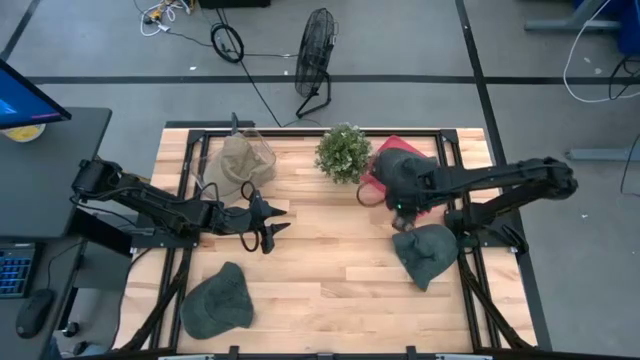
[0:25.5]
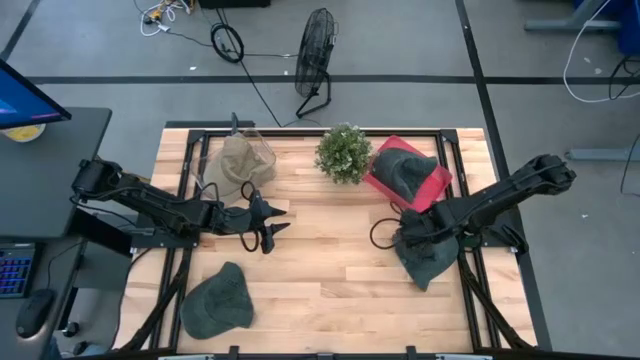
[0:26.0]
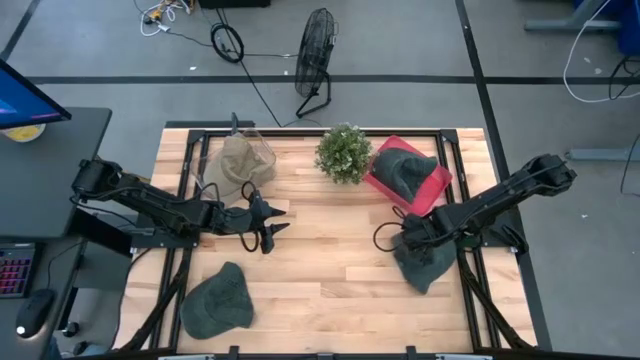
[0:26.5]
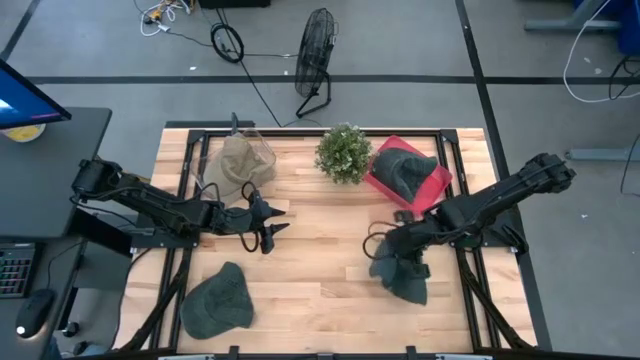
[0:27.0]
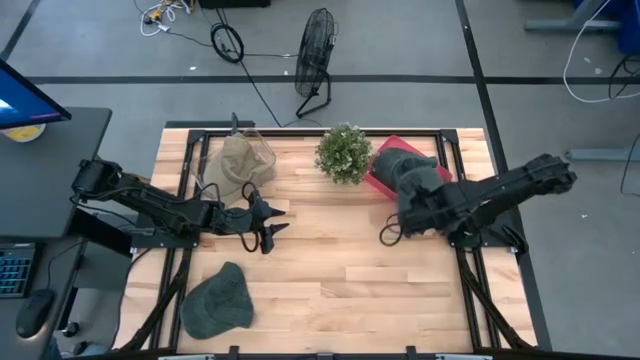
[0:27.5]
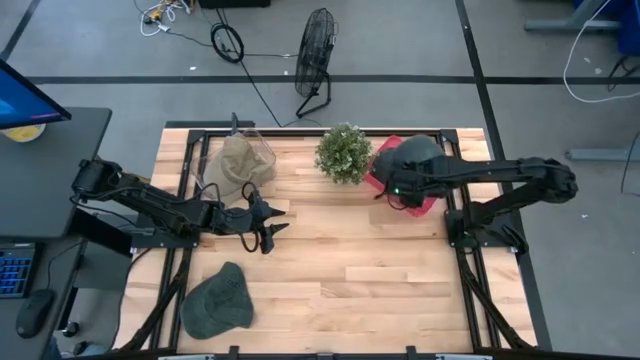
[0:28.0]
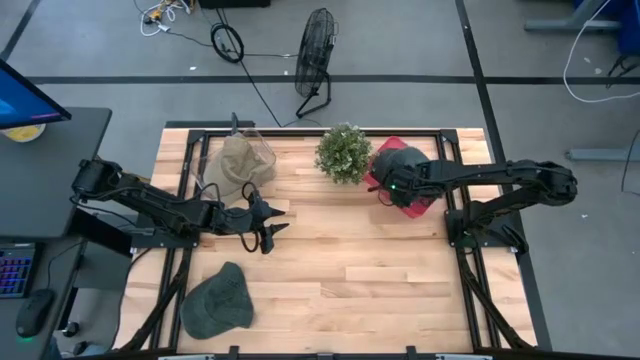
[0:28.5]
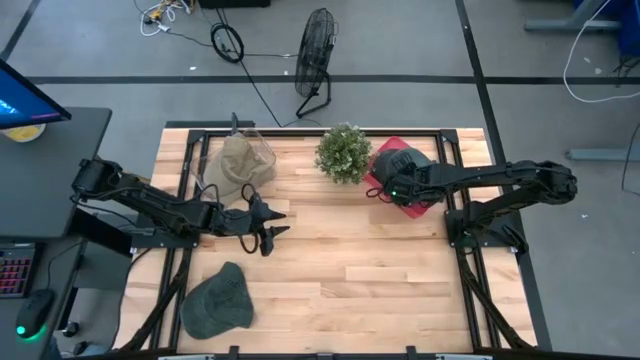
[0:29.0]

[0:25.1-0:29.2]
Task: Pick & Place hat
Put the right black cap into the red bin

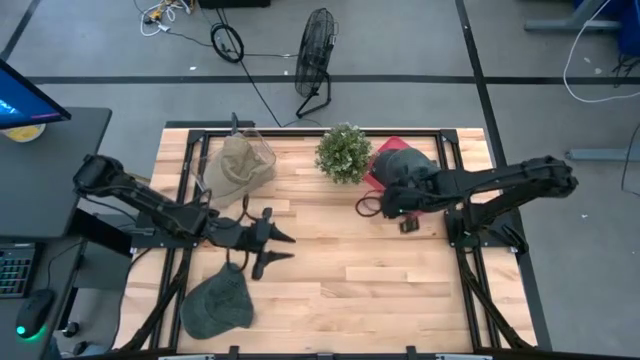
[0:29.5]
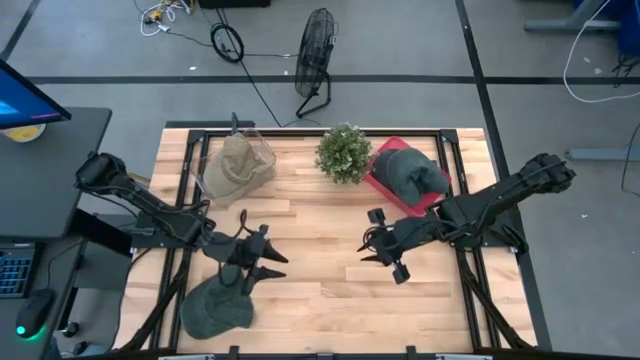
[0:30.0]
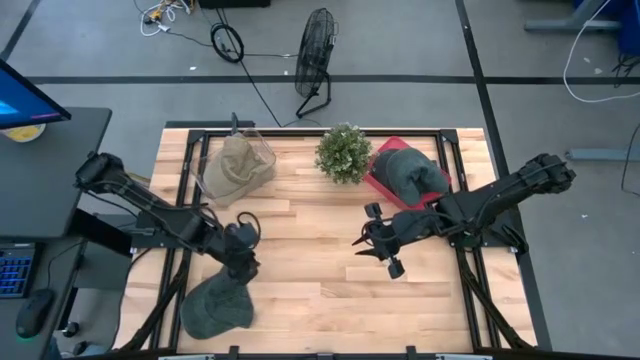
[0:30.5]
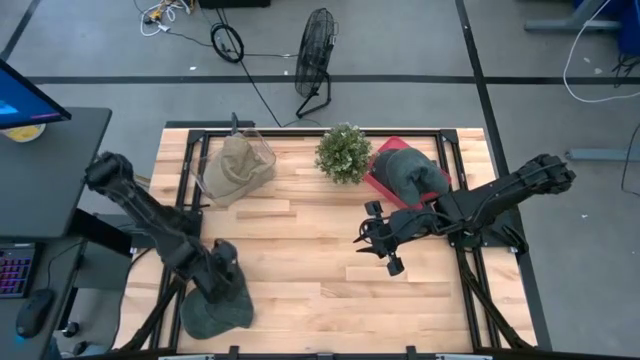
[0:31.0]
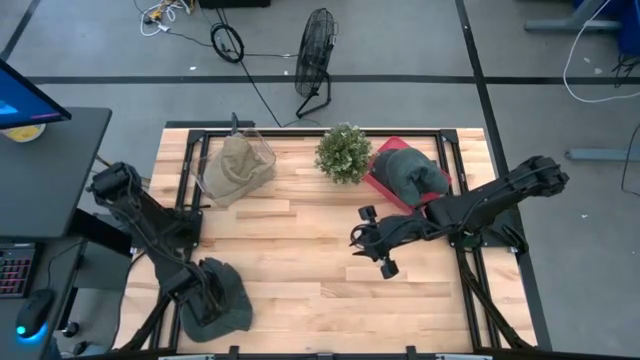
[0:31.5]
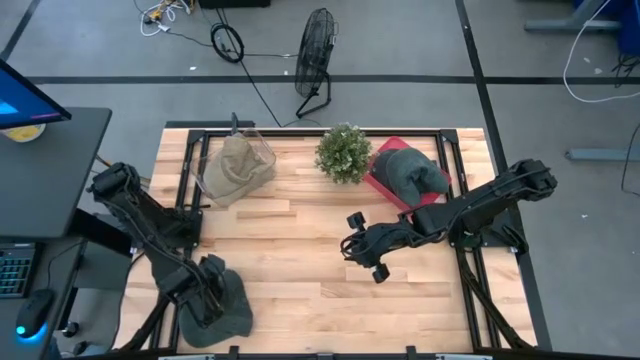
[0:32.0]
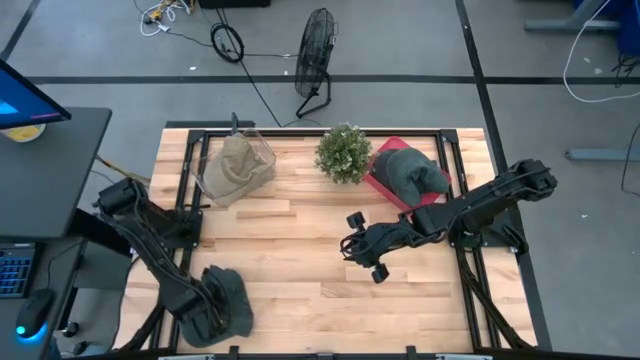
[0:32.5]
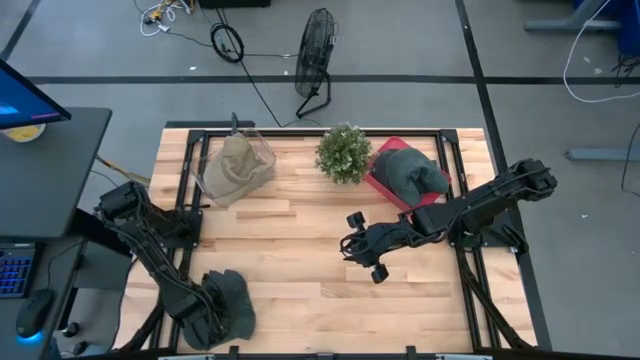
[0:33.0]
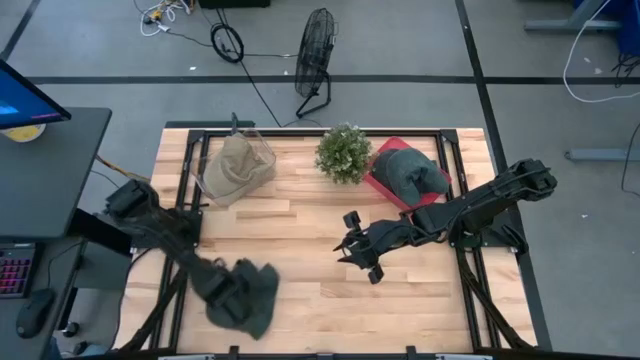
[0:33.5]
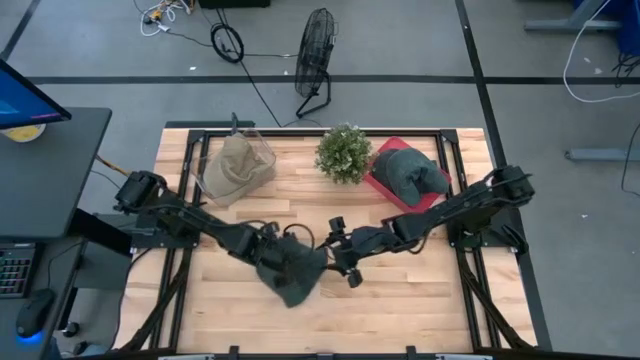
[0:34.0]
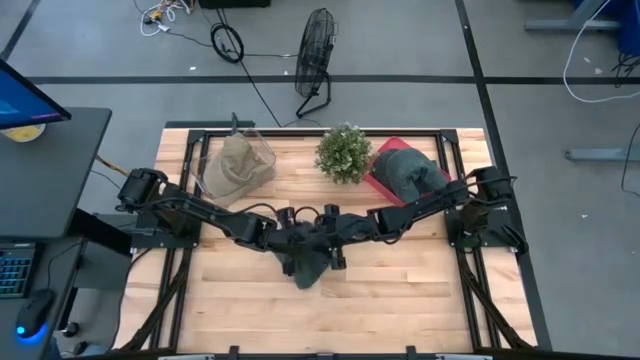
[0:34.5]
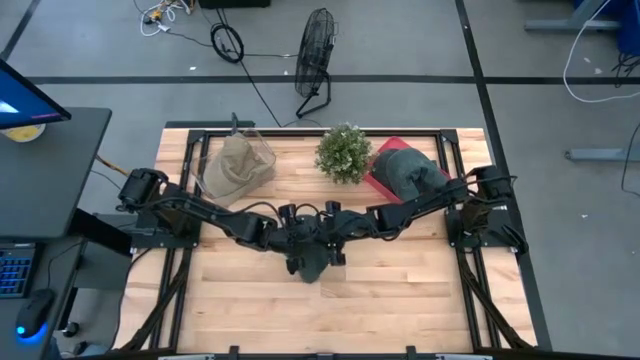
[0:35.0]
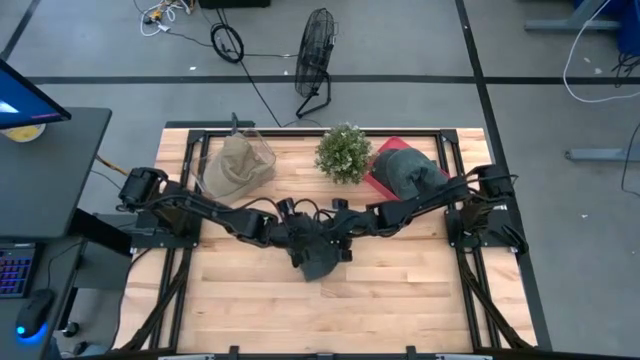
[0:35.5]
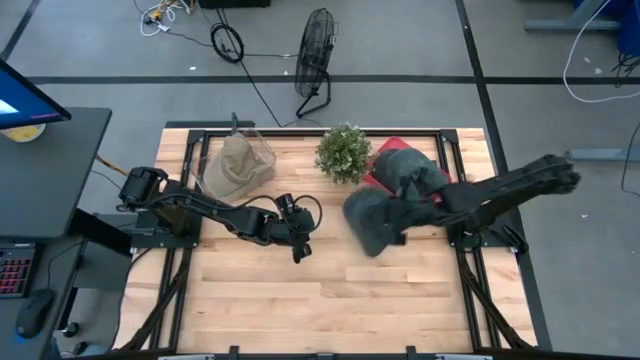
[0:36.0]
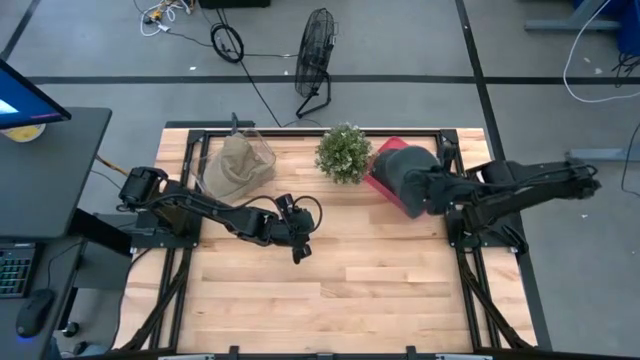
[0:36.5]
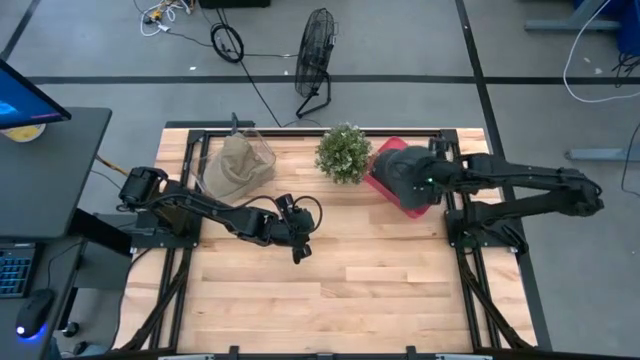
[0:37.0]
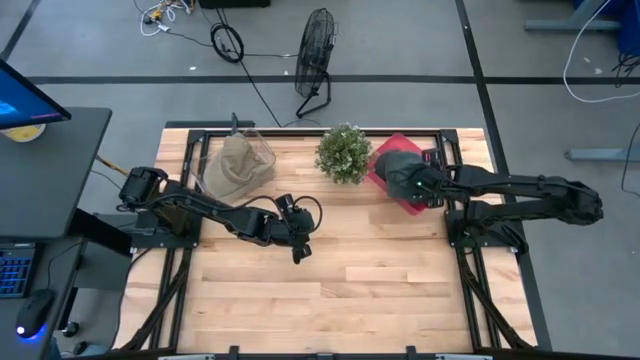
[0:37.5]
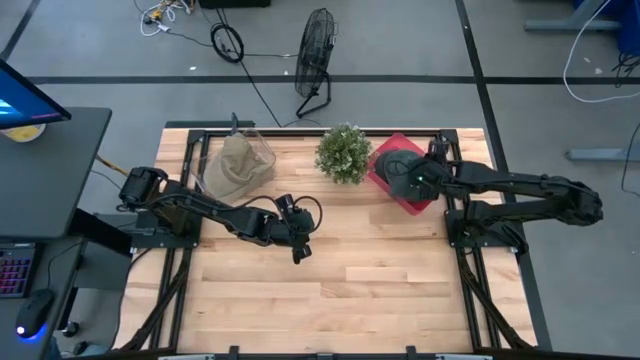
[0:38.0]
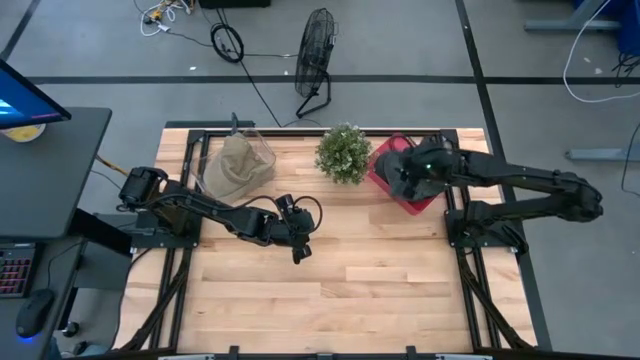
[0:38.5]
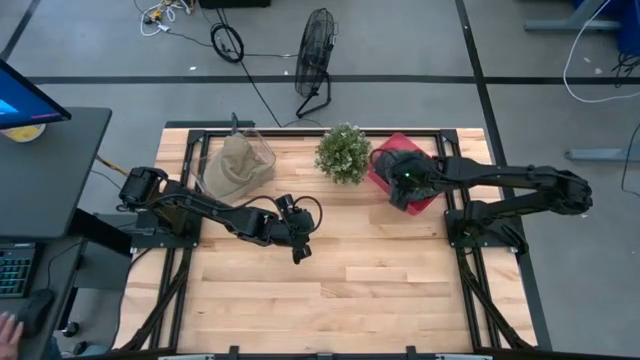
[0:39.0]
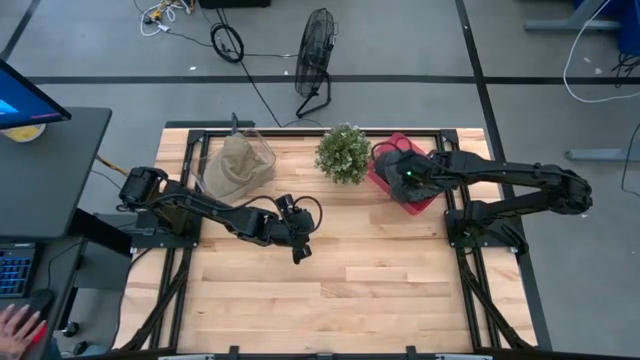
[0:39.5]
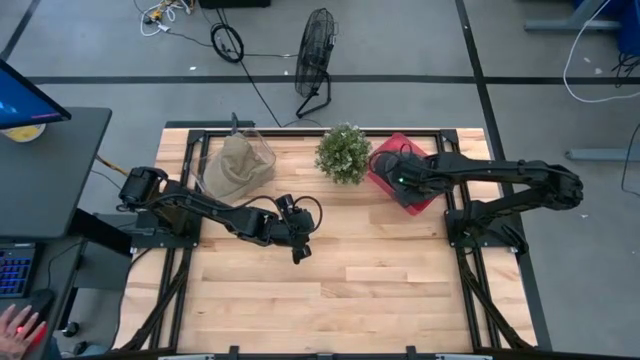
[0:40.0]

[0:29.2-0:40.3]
Put the black cap into the red bin

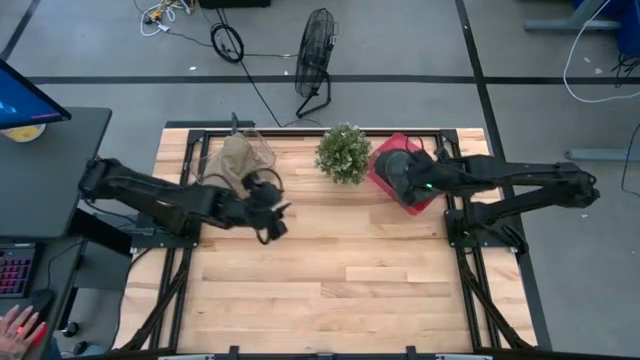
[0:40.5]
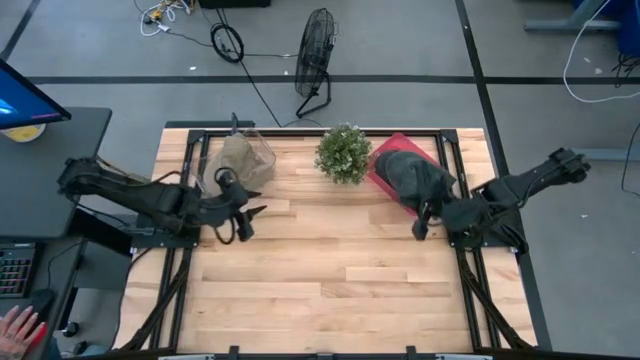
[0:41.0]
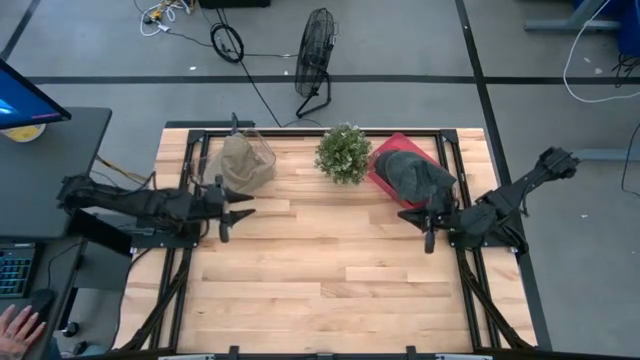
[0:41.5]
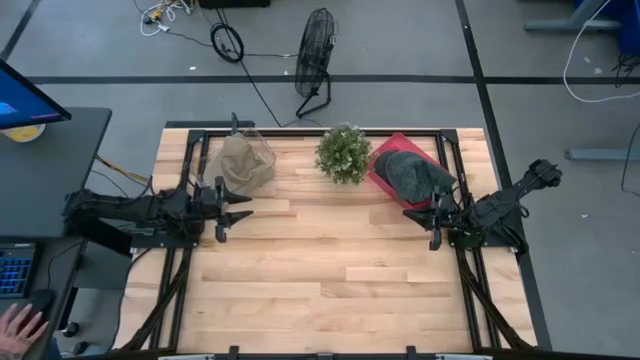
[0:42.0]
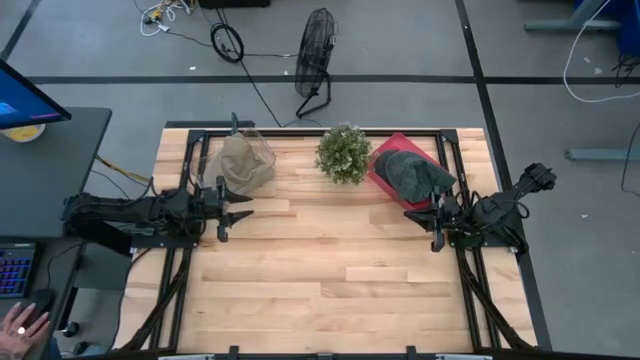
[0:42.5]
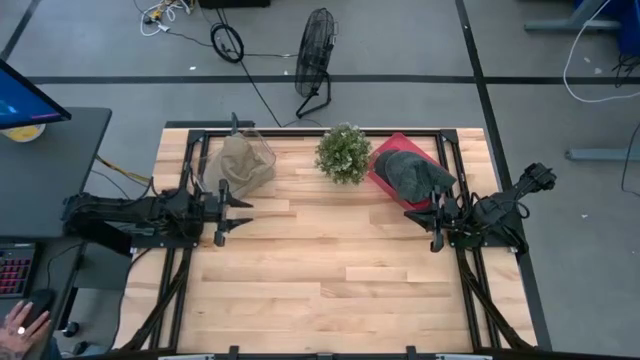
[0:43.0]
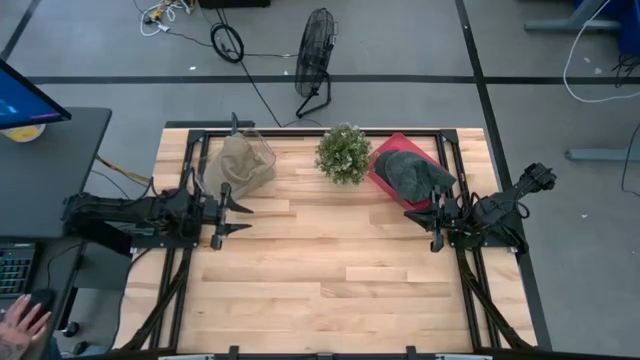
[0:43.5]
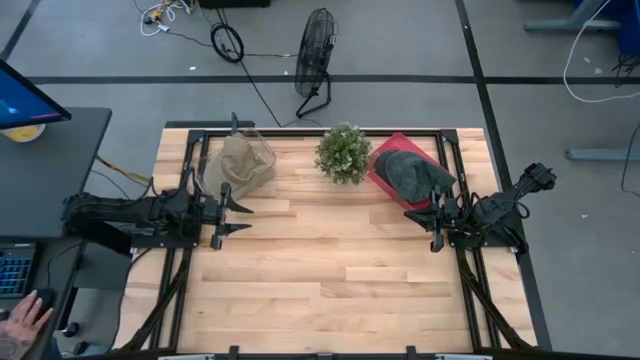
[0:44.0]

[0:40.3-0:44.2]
Return to Home Position

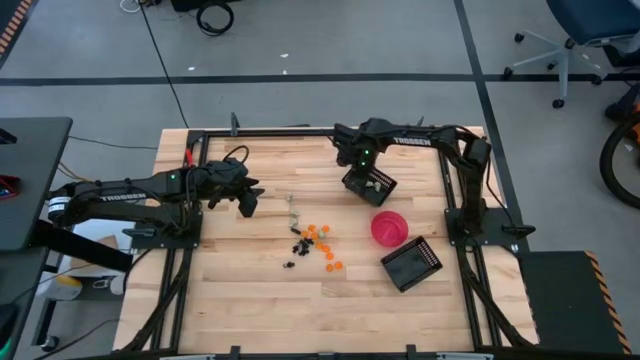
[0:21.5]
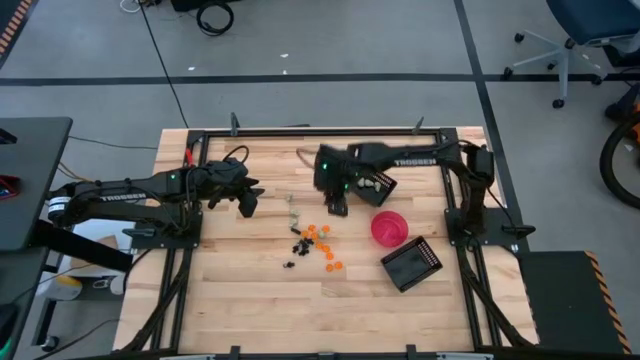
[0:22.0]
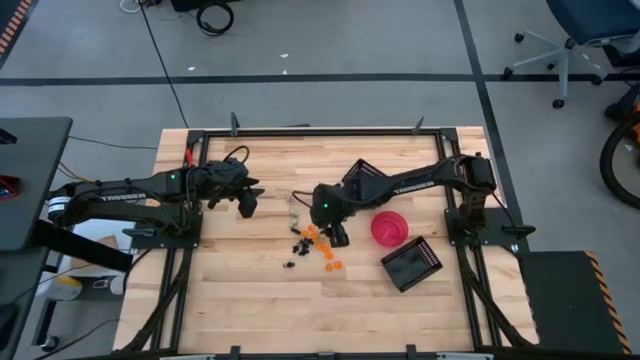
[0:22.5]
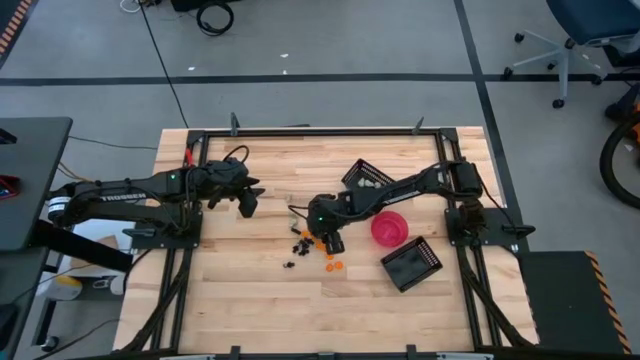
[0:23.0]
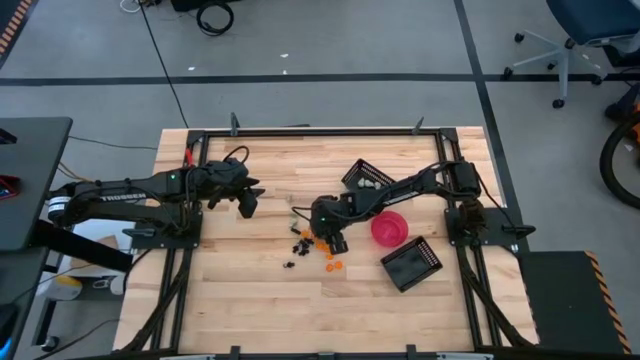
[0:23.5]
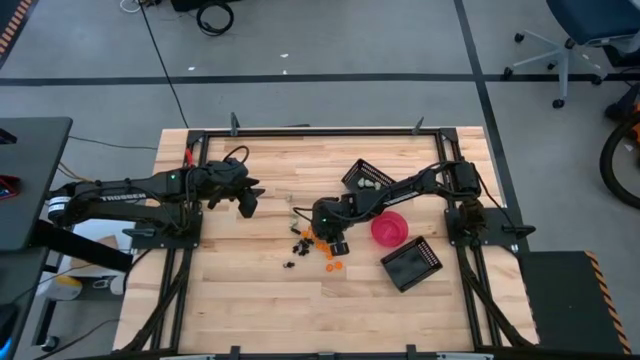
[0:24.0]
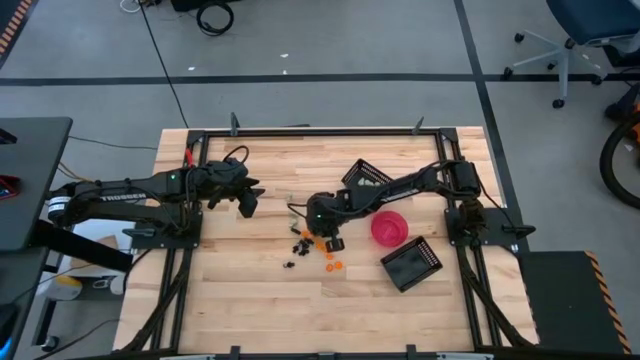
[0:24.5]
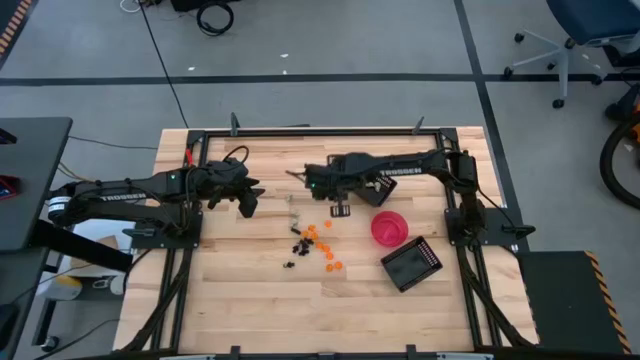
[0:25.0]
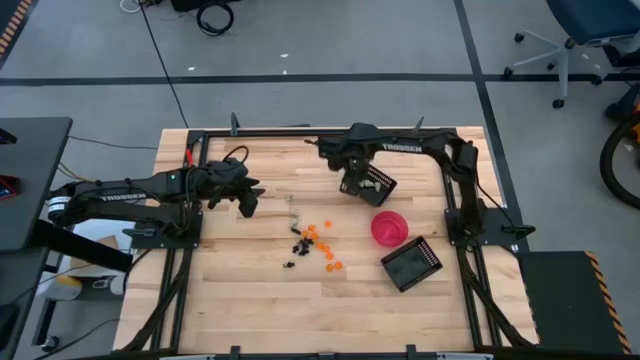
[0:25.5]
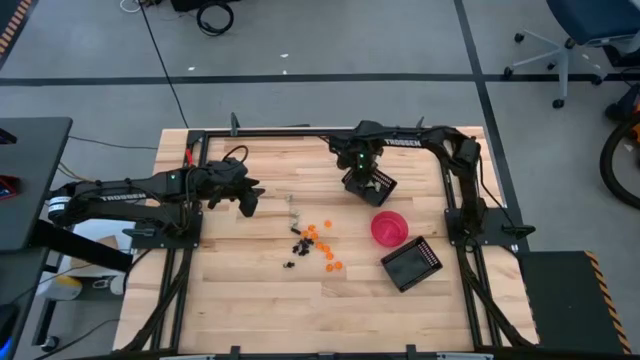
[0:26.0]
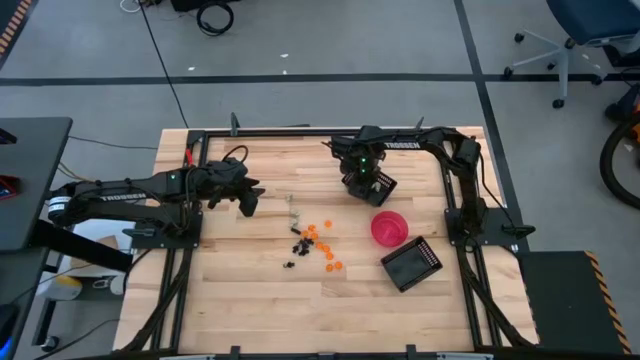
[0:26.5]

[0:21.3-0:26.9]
Task: Sort Halloween decoration
Put the white skull toy into the top black basket
